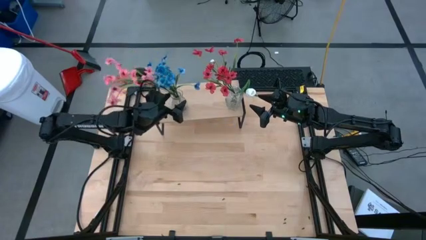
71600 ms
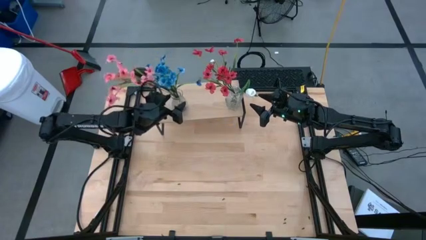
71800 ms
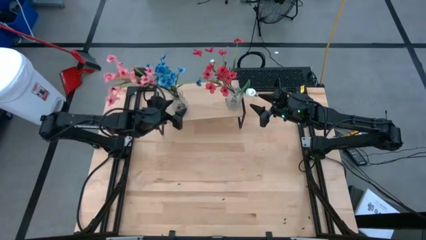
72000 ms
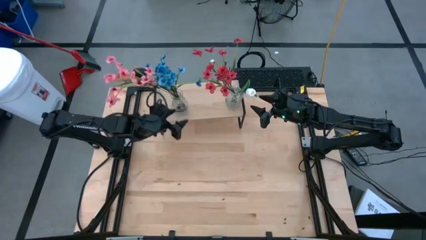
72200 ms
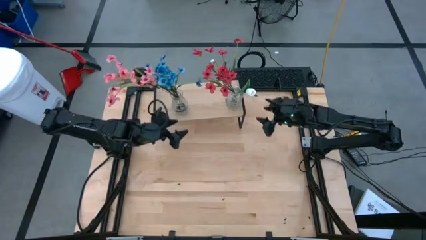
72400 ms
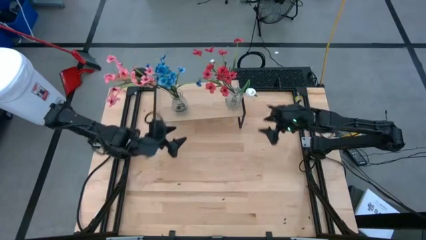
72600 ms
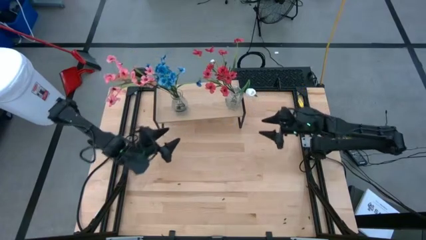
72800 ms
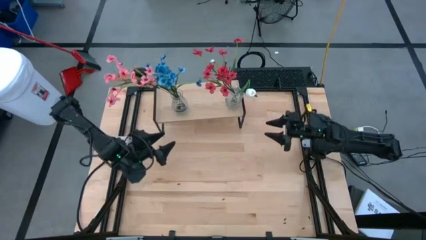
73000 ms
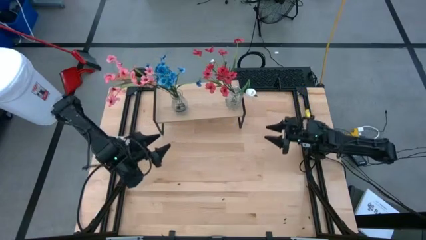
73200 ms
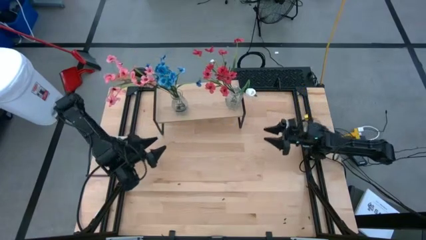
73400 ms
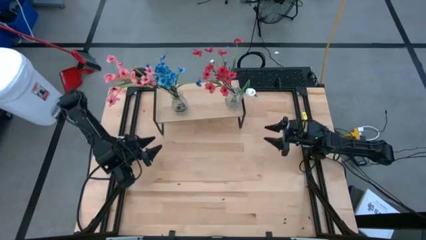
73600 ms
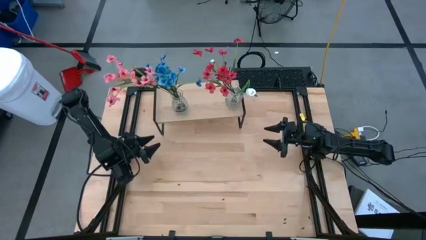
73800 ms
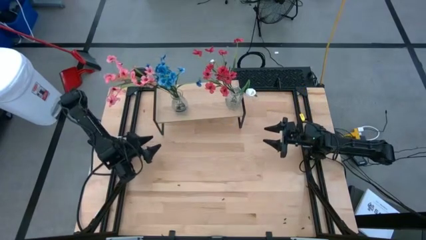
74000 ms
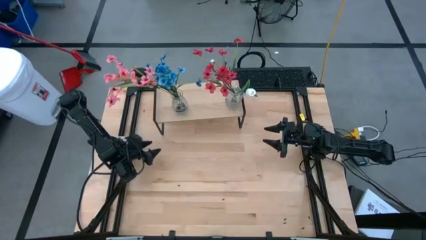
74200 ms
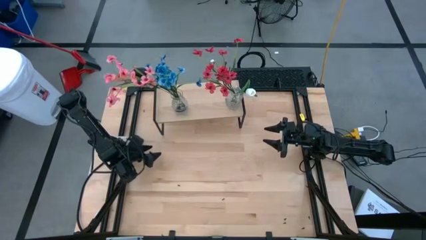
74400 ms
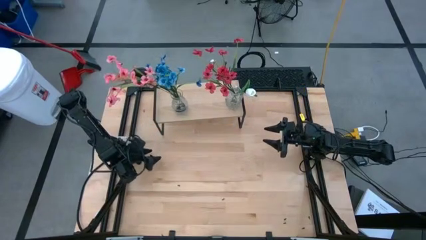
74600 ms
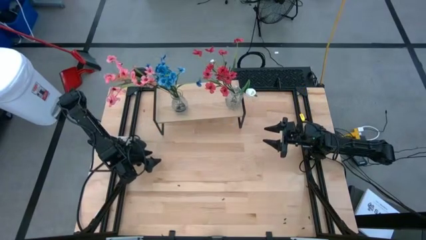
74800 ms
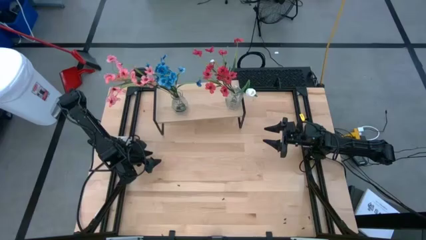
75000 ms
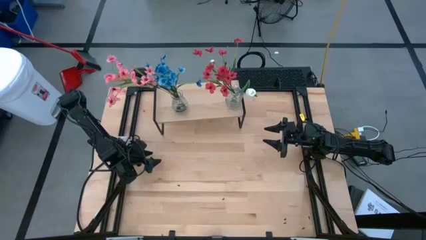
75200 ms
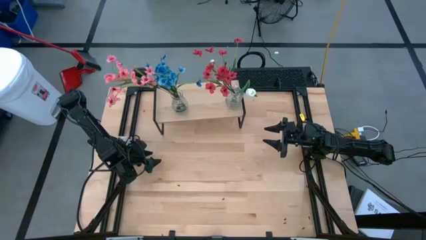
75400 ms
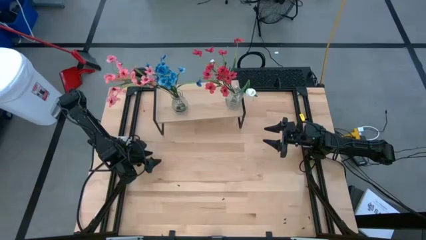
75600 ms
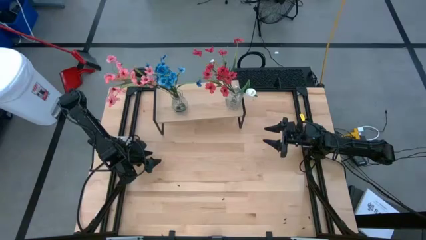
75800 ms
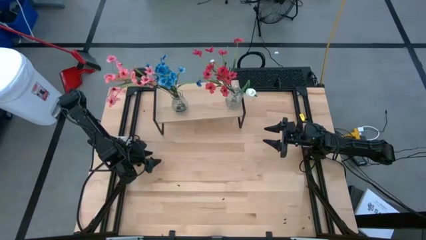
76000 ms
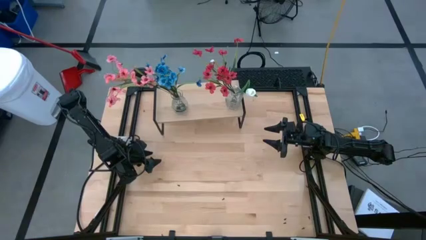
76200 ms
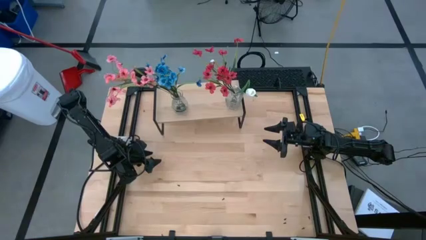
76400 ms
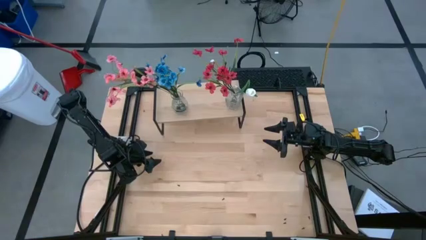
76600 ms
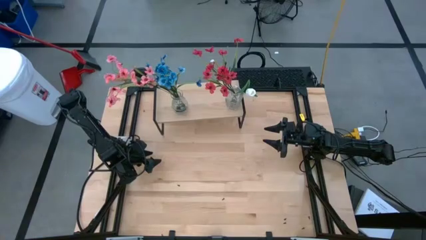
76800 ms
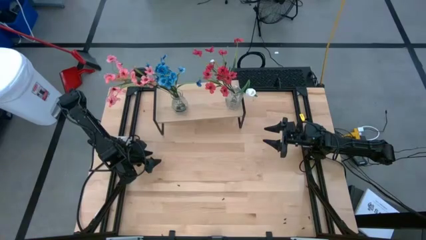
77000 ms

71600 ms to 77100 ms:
Task: Pick and place flowers into a vace then onto a shelf
Return to Home Position

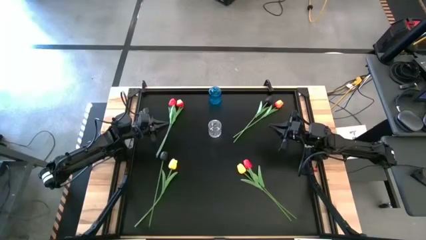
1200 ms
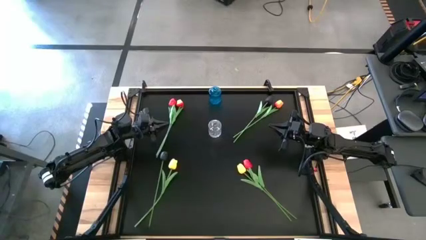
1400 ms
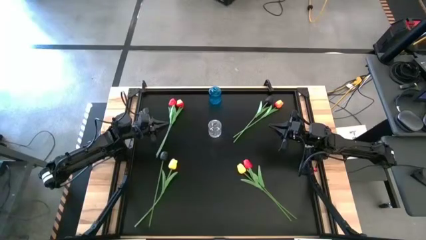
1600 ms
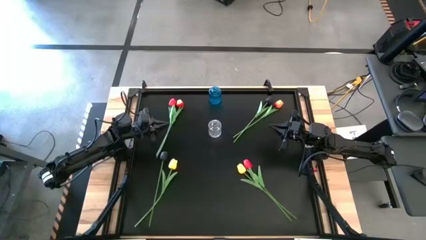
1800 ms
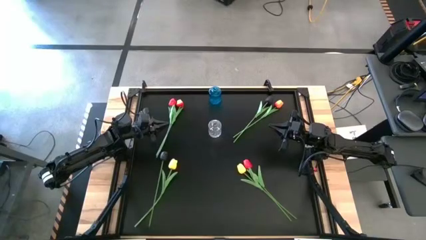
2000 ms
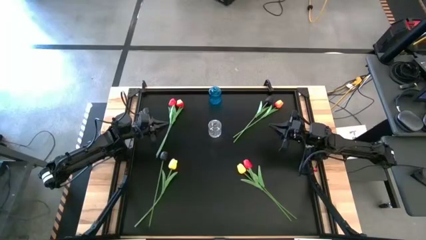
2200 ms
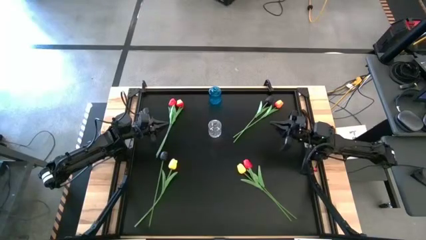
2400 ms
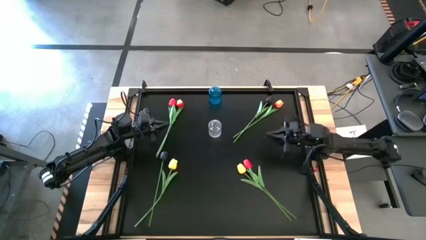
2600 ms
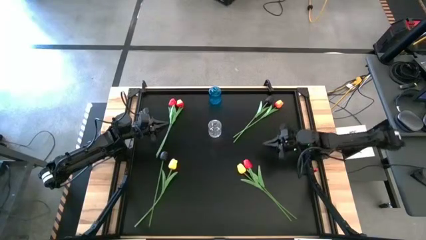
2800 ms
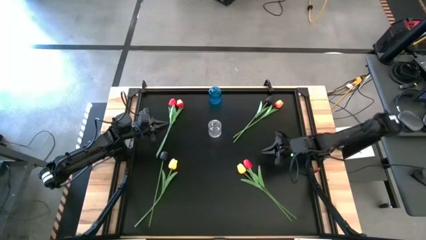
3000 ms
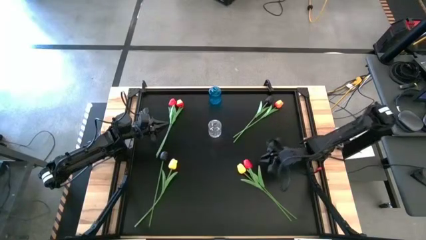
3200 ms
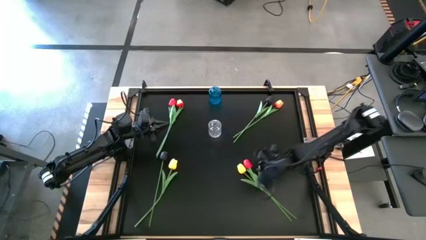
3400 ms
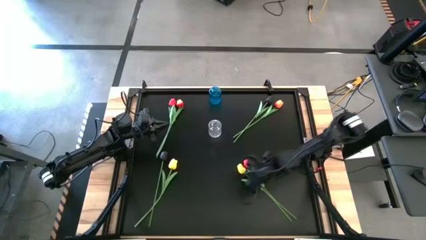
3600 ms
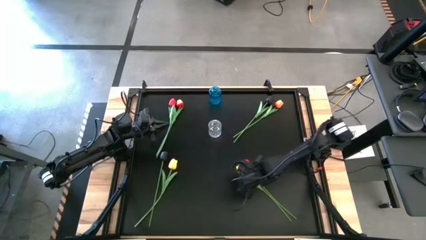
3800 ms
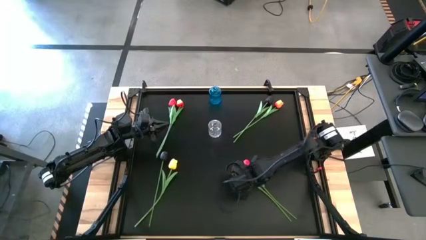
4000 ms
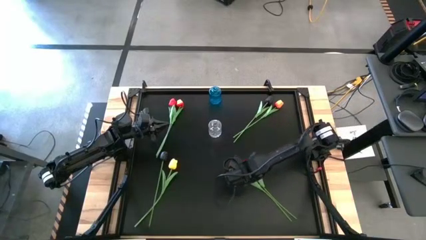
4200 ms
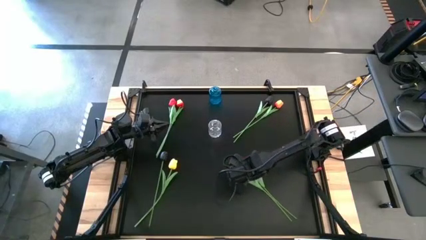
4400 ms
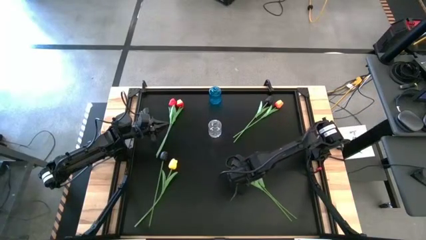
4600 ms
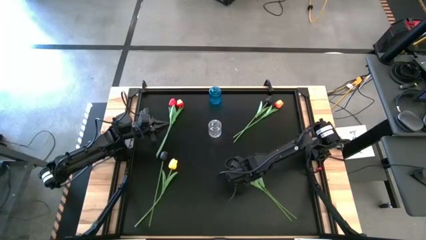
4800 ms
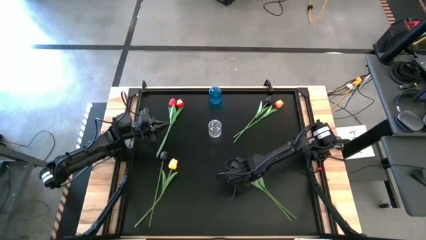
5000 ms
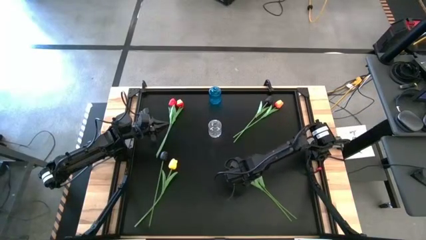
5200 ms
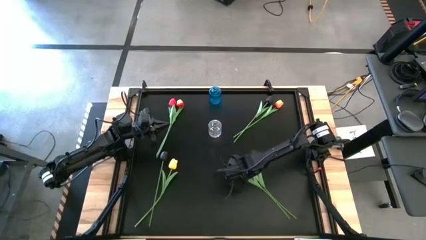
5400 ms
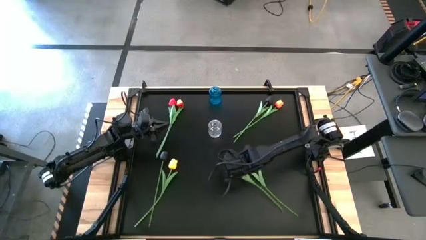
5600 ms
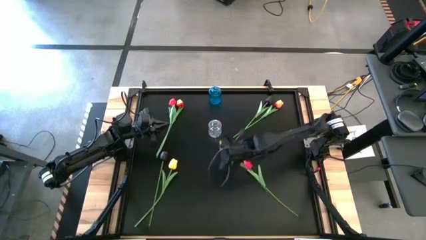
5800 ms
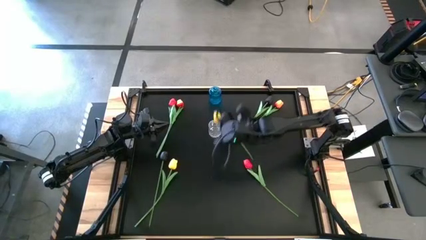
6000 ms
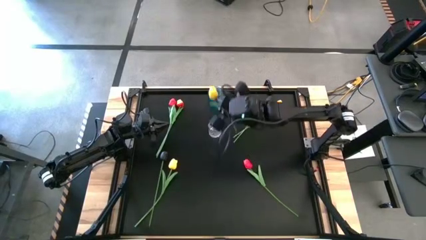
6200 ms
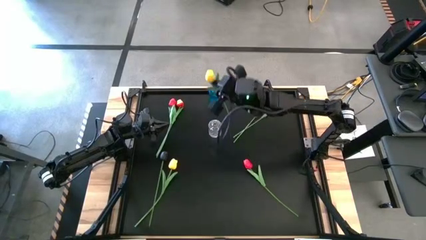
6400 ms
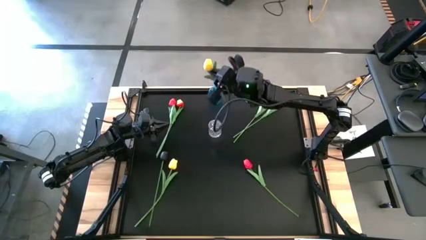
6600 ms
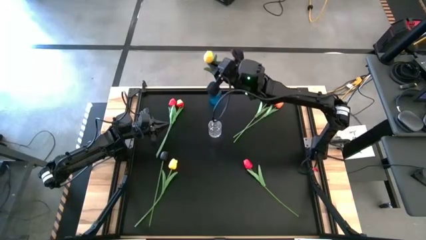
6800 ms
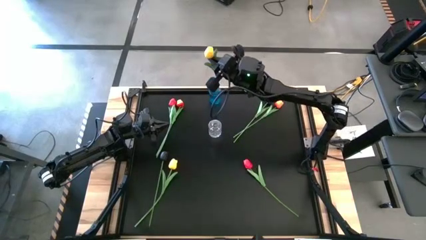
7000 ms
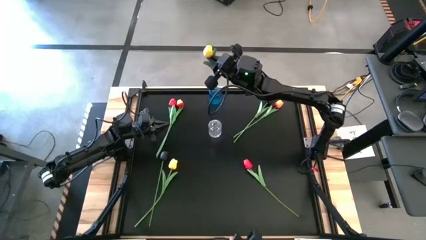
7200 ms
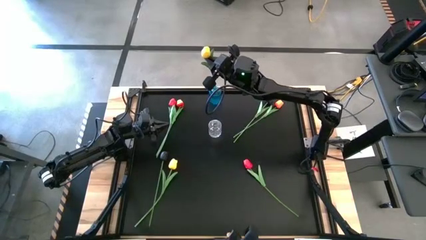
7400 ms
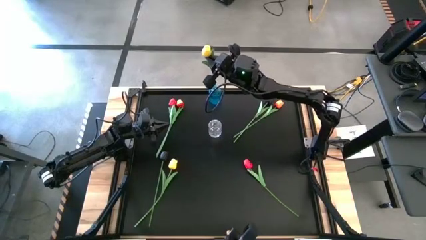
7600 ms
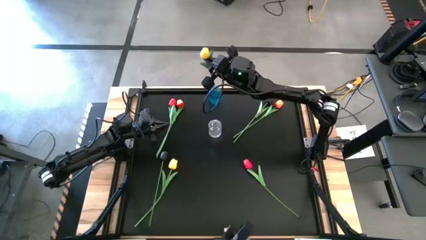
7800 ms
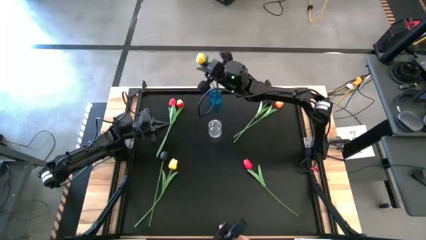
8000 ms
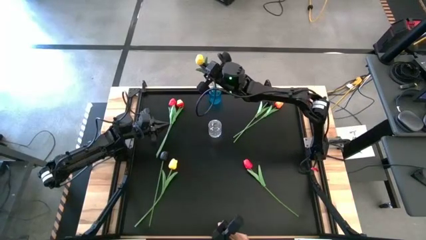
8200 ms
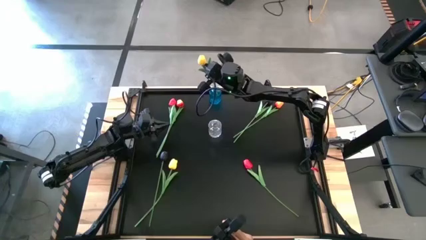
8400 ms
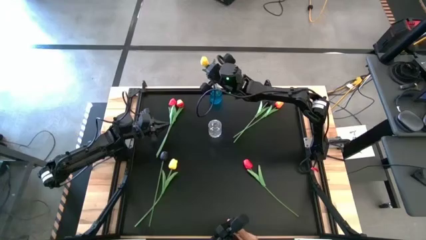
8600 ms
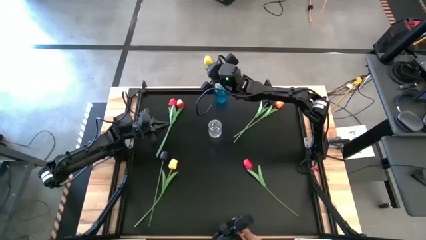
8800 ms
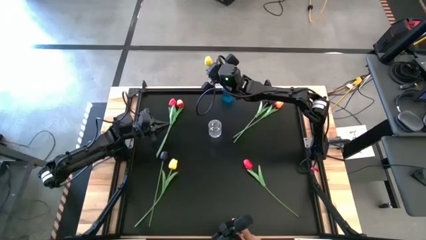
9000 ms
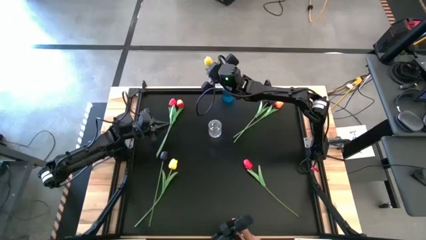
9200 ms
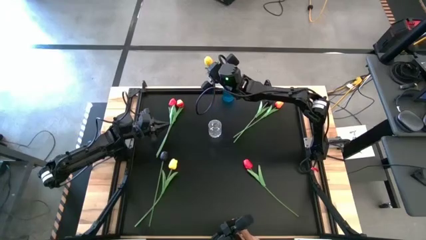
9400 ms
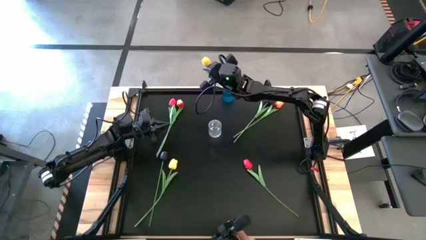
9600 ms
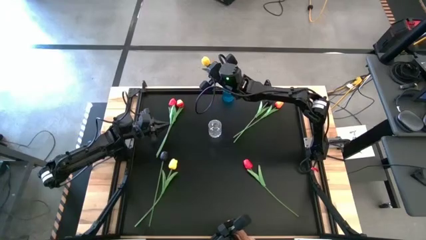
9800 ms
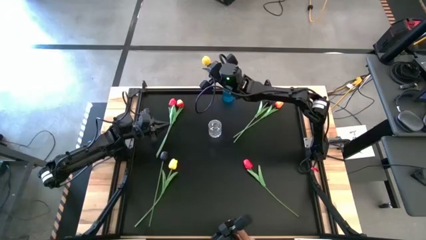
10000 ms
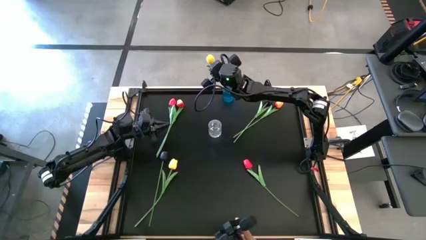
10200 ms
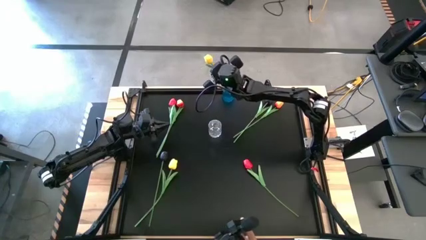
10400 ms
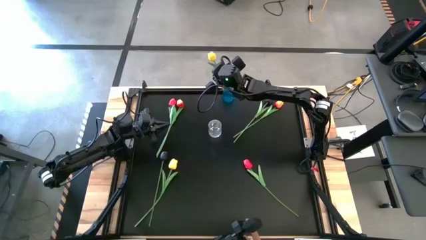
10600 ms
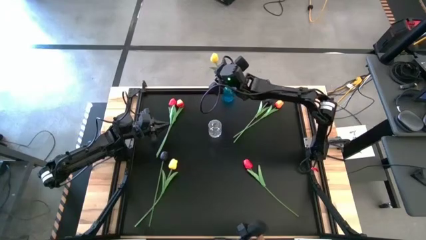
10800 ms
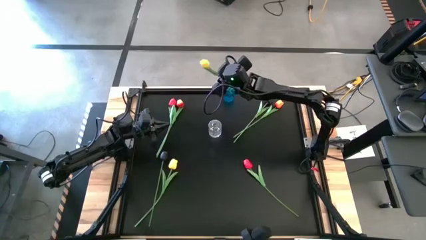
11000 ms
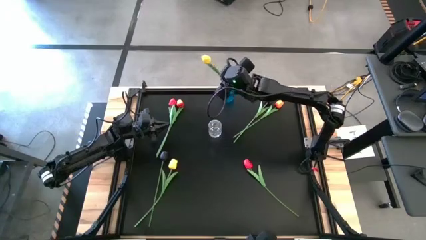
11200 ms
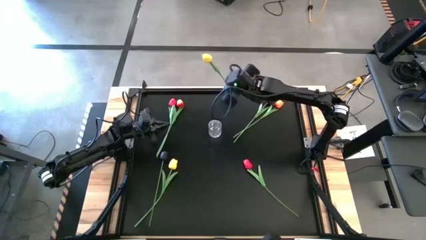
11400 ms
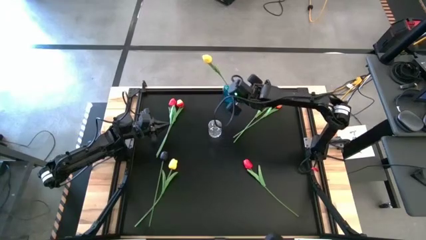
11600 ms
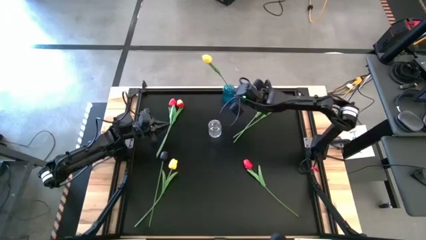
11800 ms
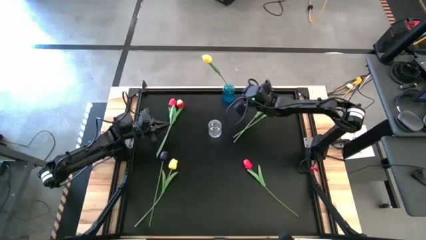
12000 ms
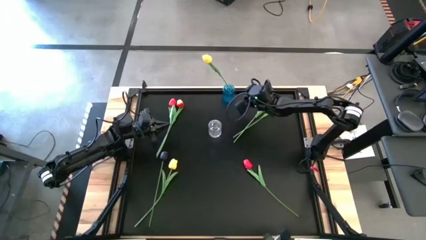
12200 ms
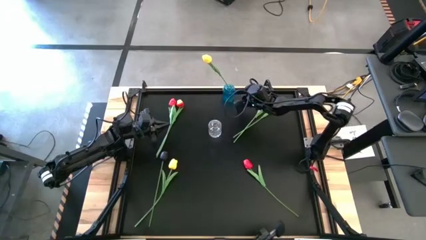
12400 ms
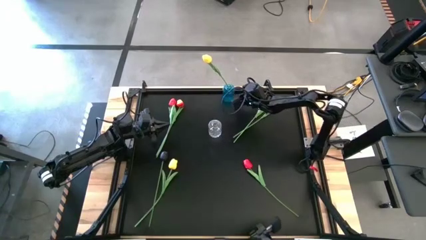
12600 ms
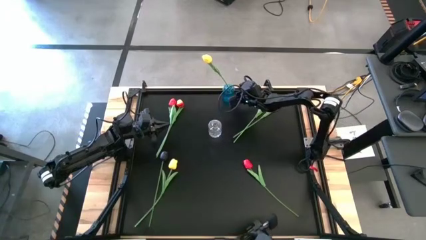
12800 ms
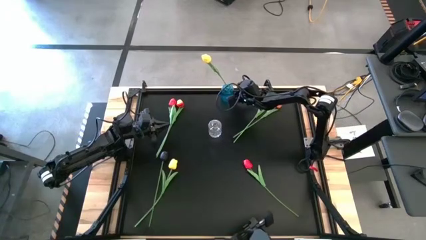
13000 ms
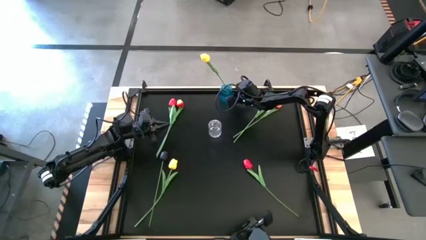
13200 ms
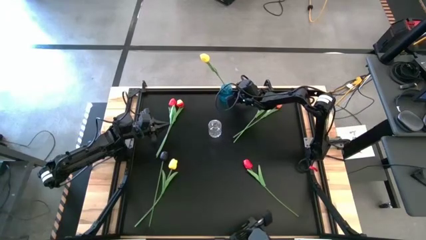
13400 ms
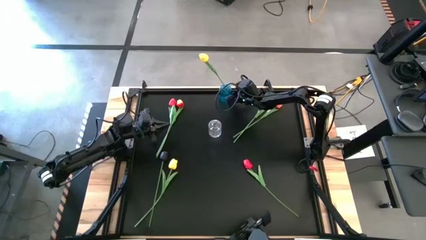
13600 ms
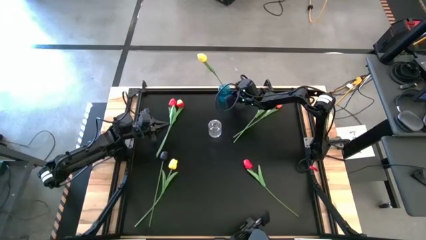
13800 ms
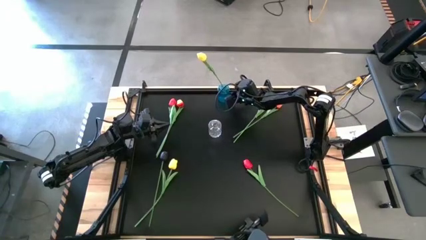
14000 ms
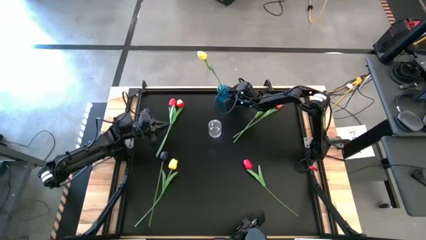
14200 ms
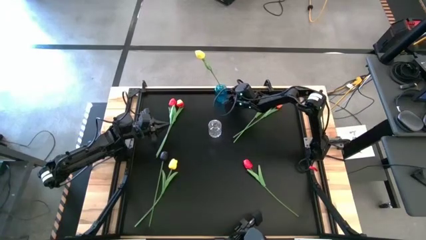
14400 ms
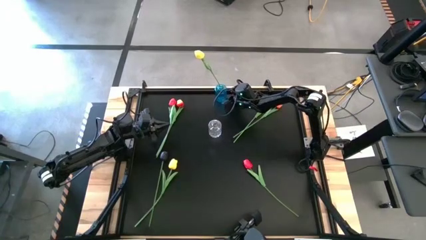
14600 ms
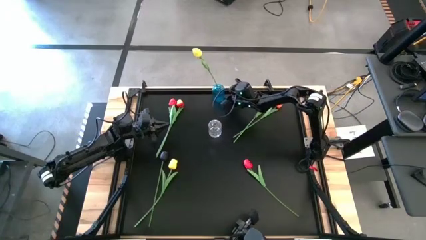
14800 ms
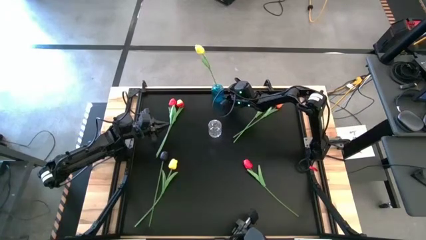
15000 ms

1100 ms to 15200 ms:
Task: Sort flowers into vase by color
Put the right yellow tulip into the blue vase
